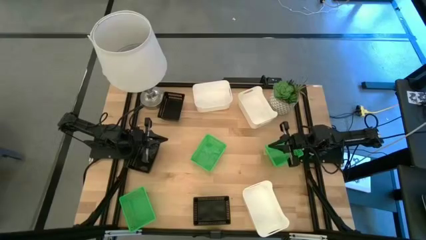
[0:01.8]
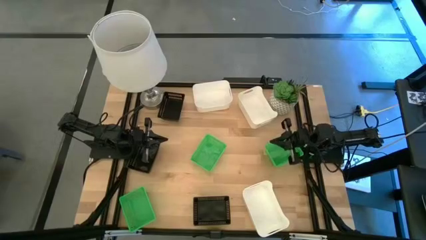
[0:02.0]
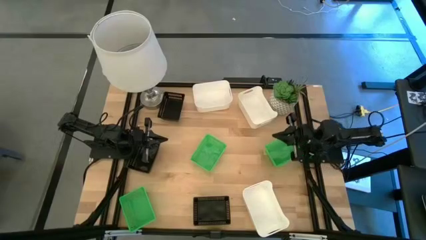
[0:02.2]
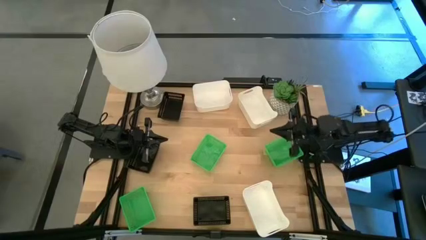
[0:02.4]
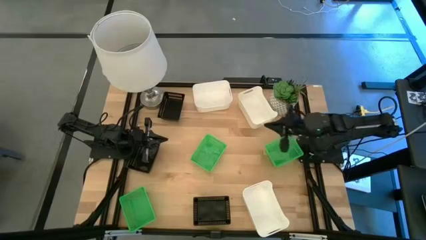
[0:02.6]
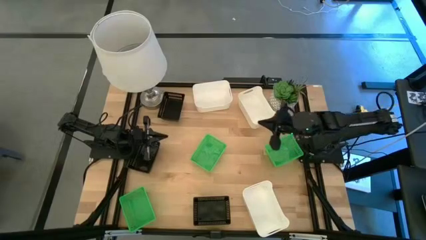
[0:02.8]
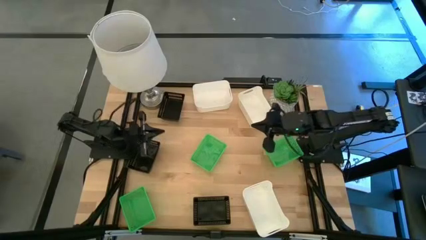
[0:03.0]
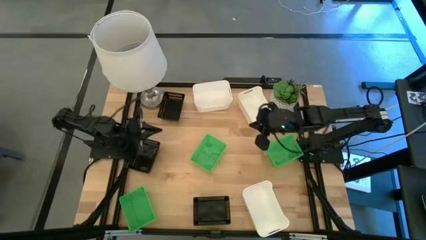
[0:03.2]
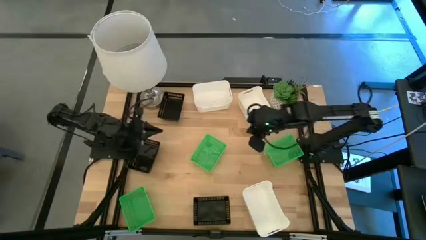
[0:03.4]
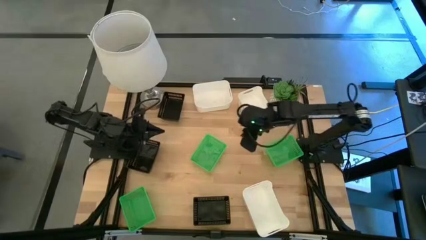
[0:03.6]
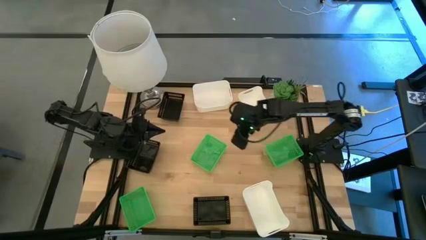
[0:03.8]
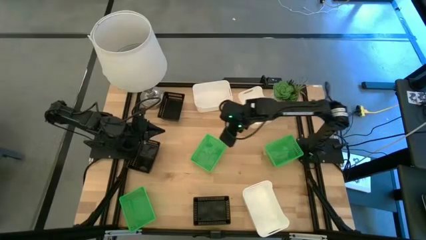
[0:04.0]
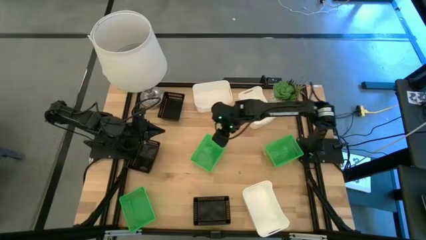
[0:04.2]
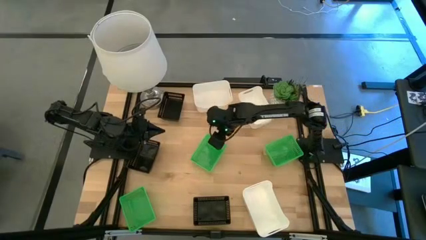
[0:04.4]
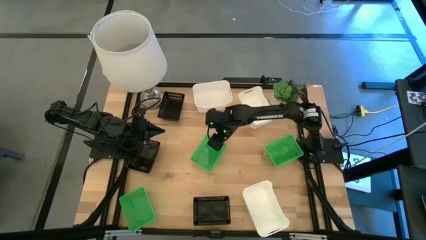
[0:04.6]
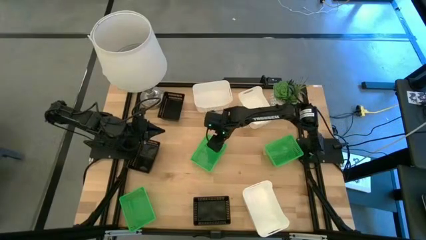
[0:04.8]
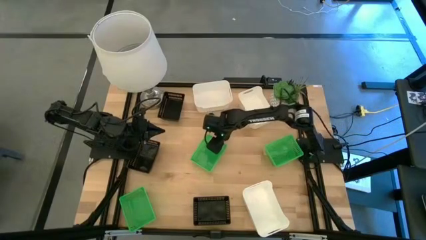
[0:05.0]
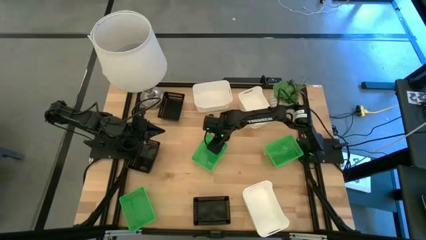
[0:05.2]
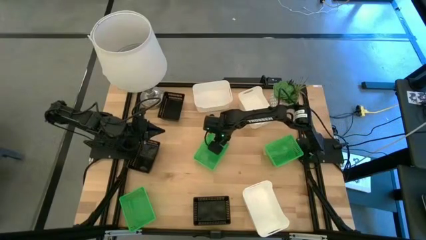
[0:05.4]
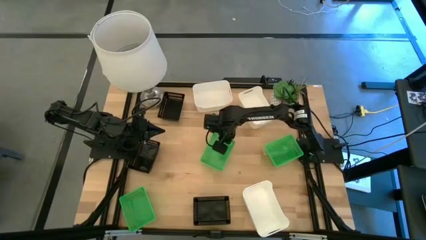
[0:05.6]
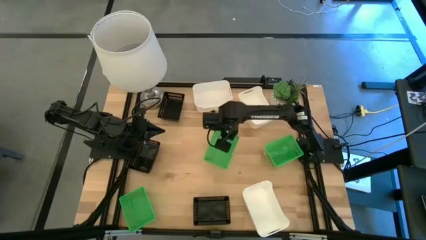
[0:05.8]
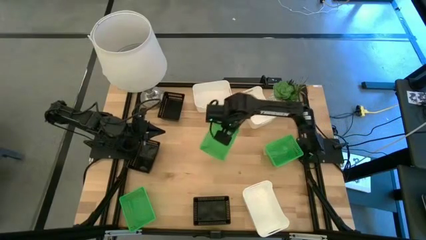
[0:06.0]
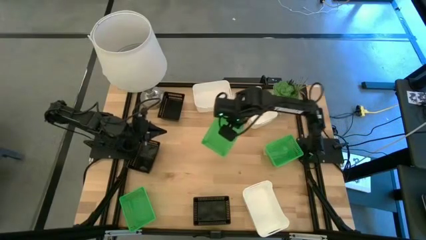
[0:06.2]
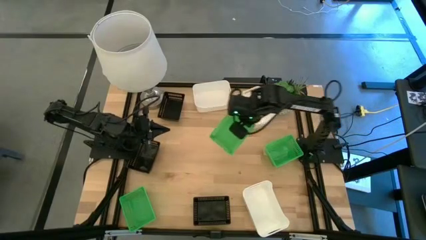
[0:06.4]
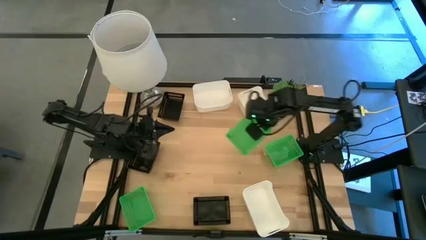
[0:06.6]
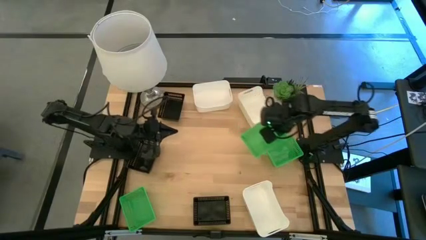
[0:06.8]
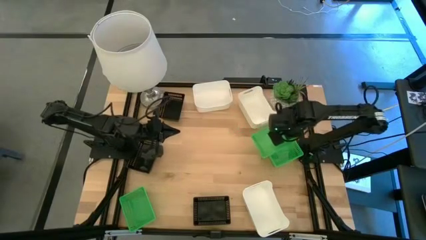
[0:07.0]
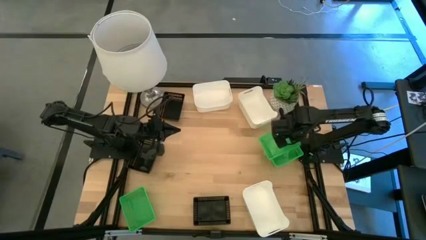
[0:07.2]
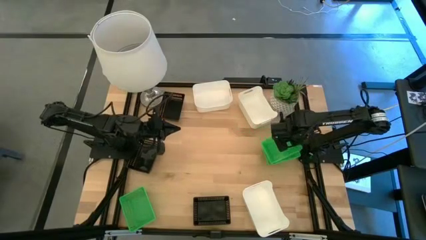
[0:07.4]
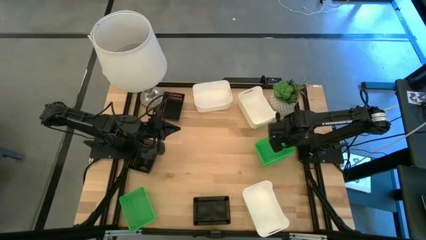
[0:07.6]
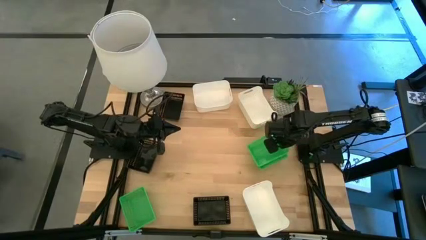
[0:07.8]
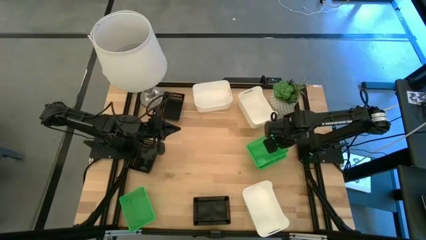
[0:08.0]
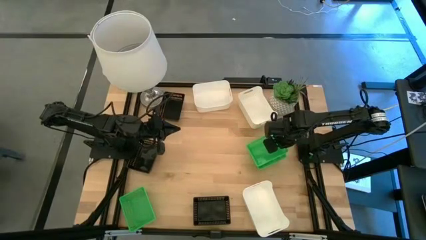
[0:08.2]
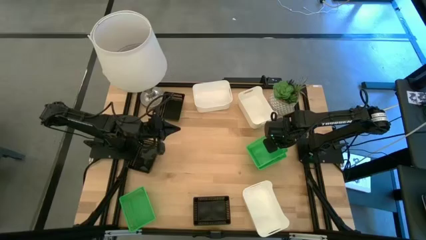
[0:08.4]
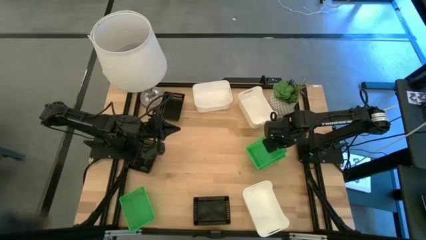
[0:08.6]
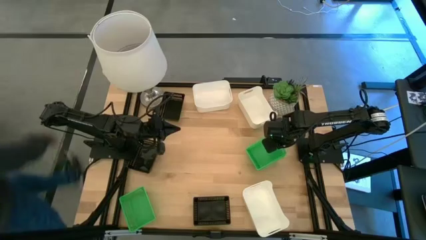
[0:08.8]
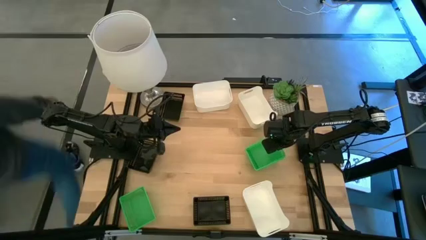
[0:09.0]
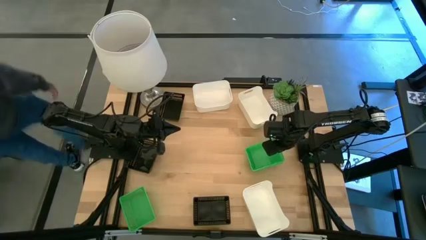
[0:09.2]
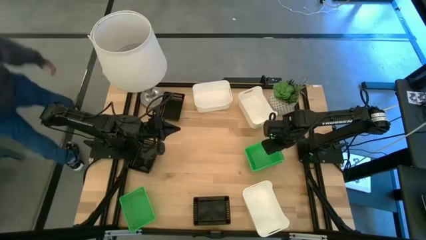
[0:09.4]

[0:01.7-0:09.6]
Stack the middle left green bin on the middle right green bin
